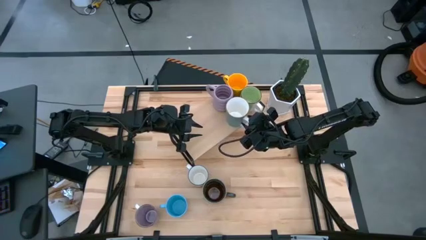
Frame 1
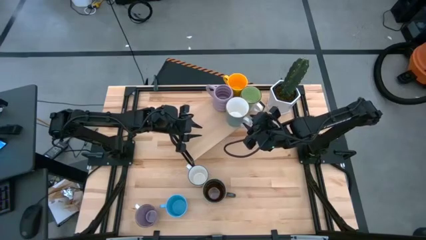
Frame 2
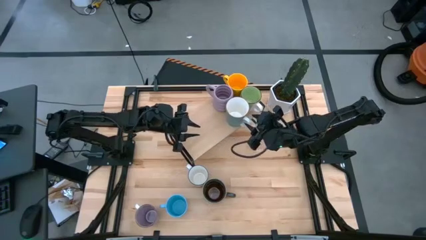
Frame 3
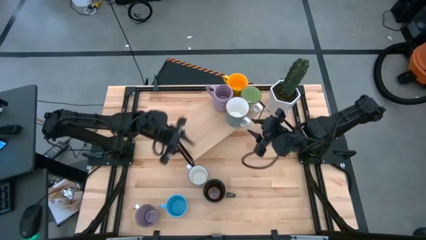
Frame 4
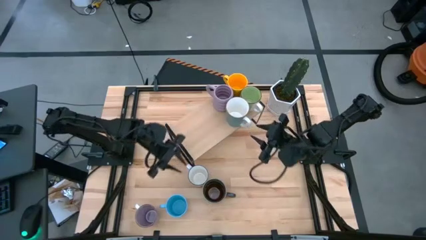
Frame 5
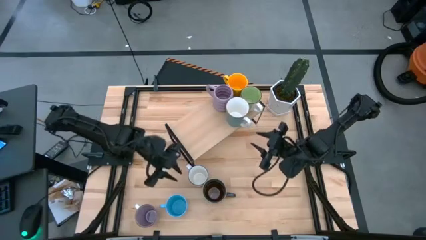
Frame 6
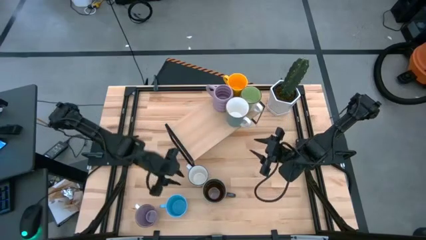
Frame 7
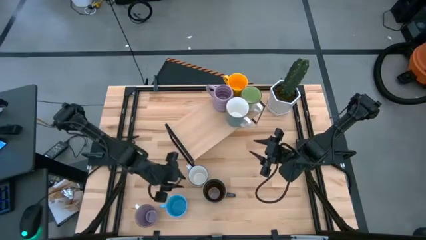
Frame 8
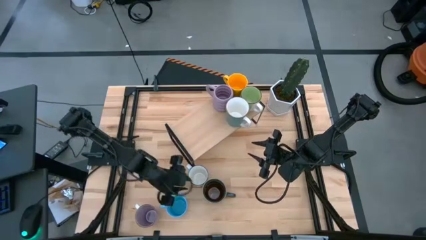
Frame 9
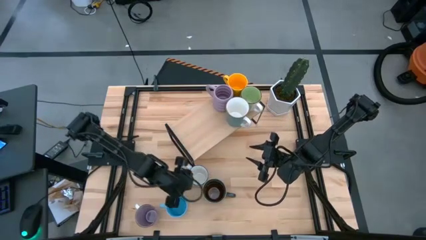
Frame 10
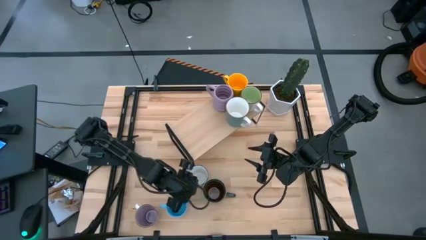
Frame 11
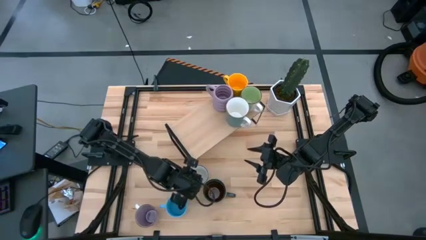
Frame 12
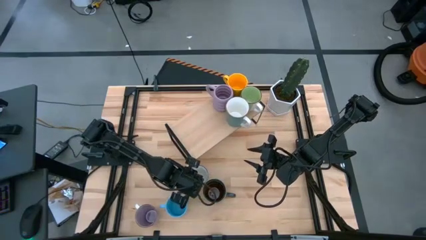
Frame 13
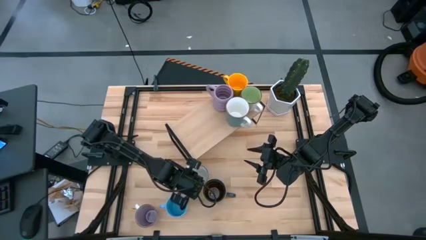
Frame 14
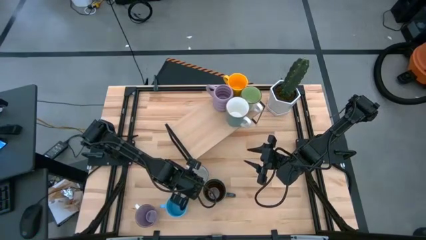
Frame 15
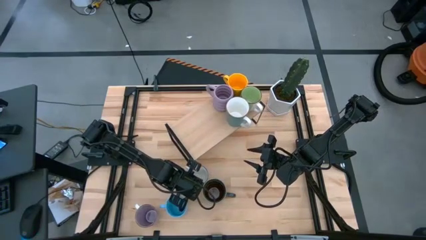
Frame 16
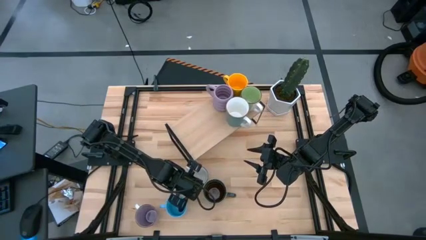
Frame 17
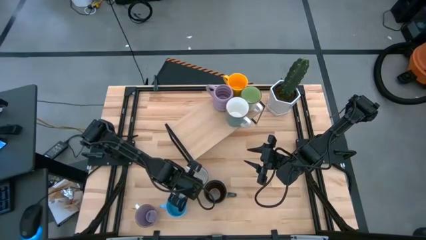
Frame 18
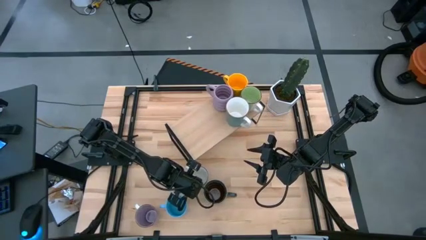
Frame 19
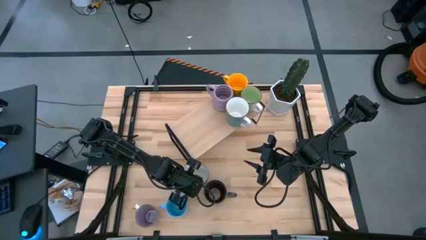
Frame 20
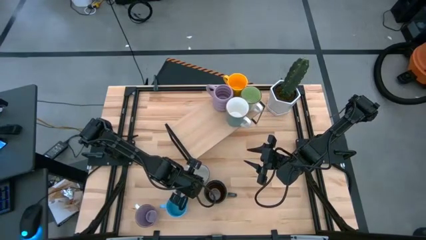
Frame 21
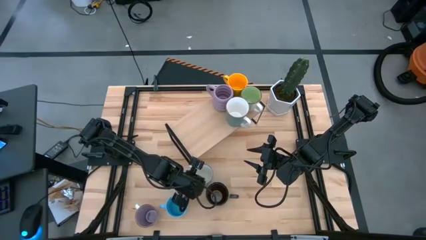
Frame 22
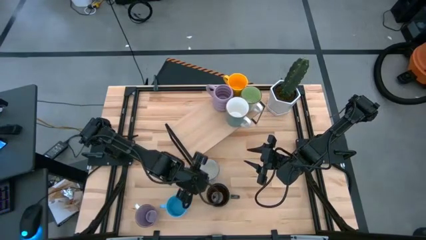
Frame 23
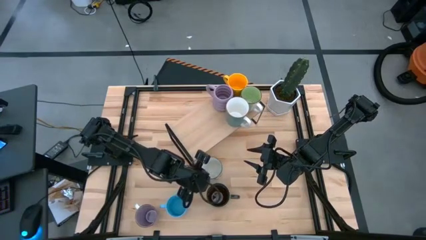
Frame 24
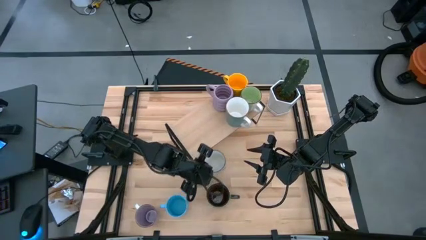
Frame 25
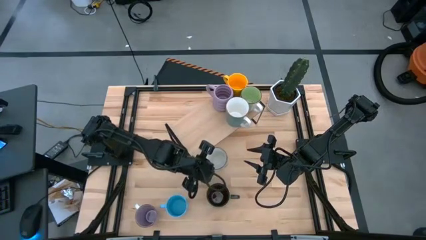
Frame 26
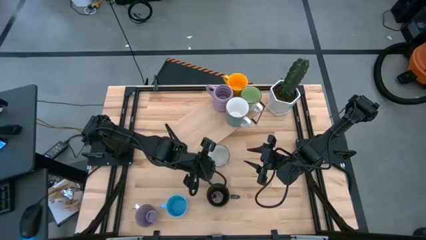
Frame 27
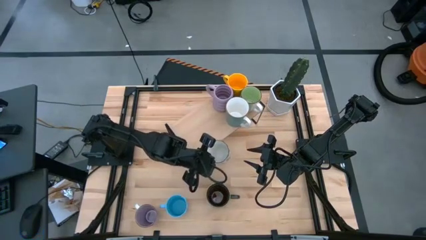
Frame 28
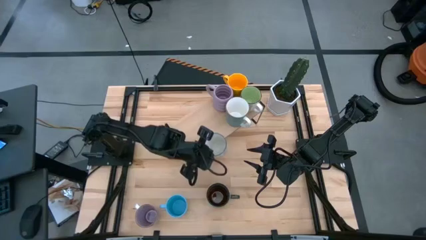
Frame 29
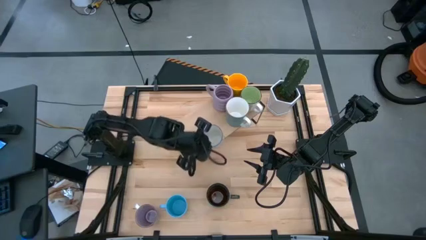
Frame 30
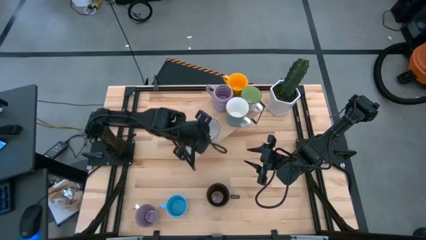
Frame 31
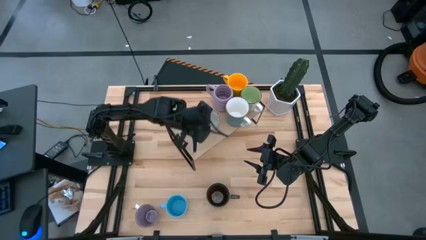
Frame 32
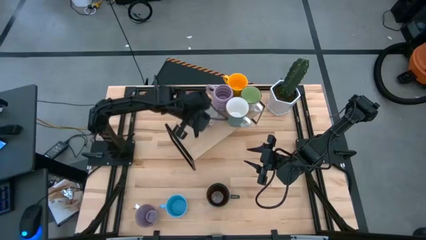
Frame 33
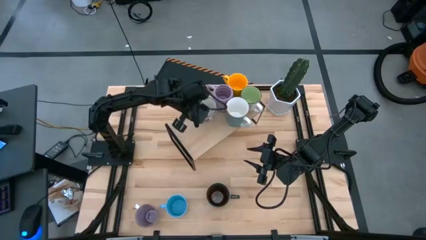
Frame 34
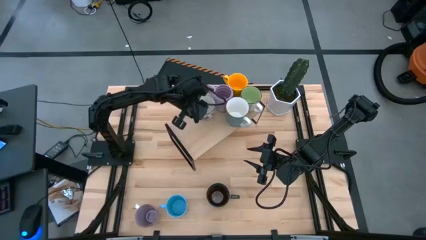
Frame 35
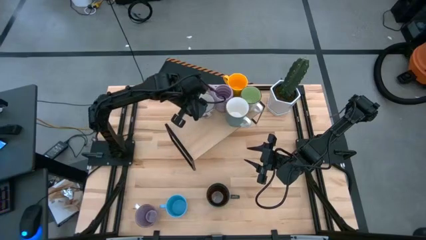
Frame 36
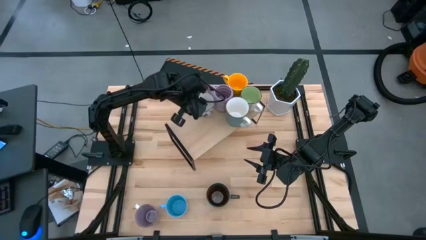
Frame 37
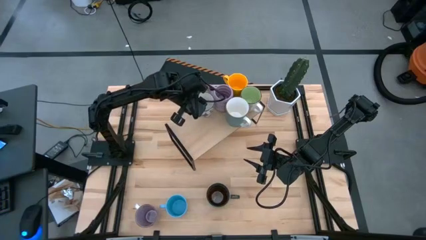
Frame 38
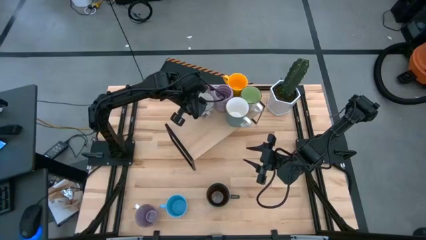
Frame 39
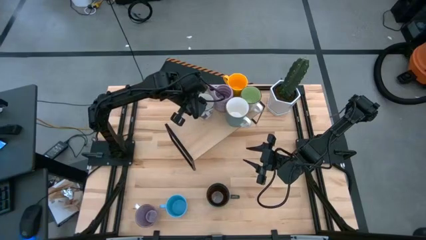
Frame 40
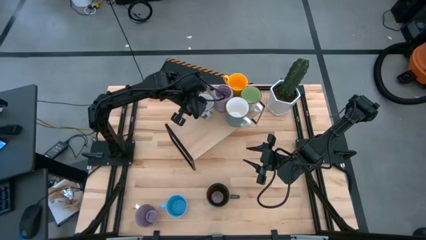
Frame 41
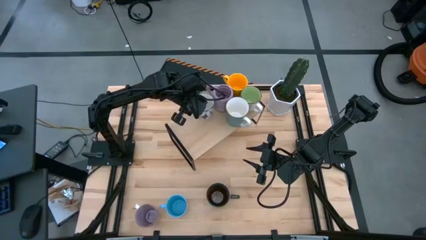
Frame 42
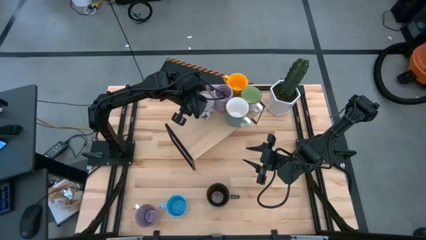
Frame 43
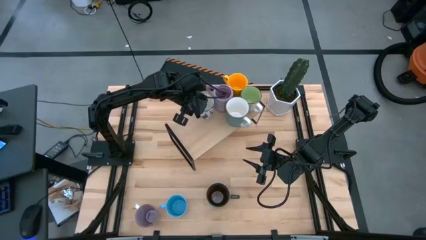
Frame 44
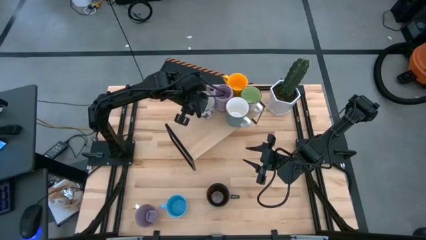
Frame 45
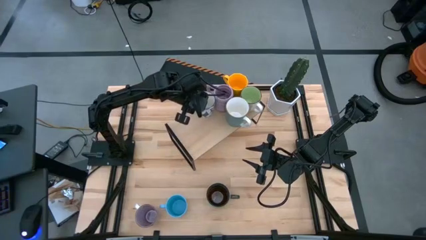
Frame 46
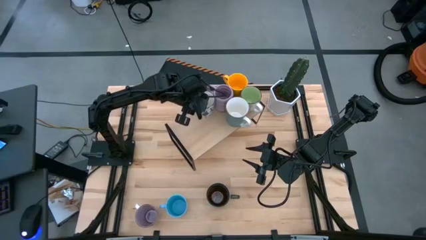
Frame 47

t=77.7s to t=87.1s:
Task: Place coffee mugs
Put the blue patterned mug on the shelf

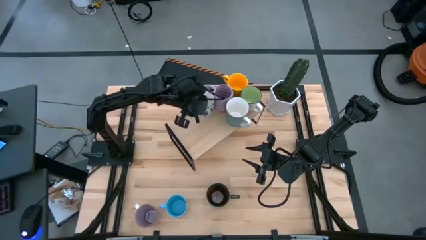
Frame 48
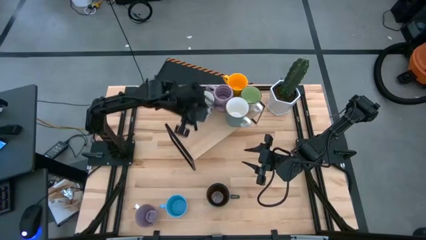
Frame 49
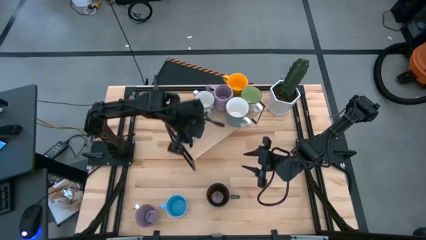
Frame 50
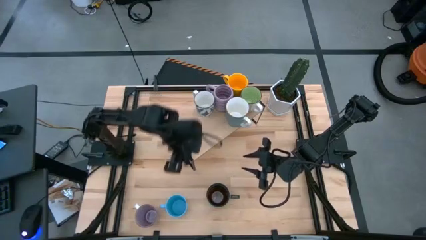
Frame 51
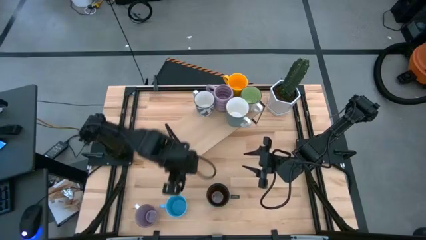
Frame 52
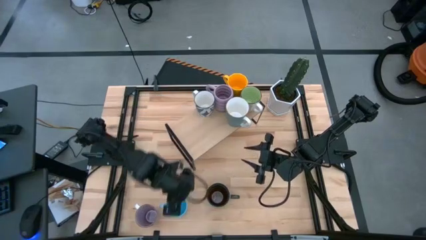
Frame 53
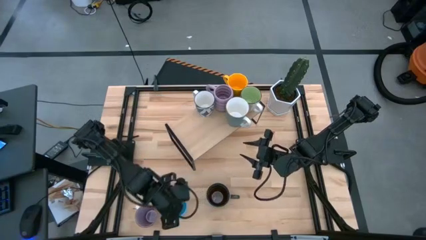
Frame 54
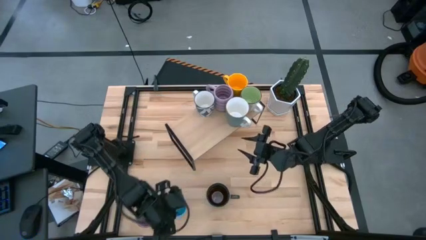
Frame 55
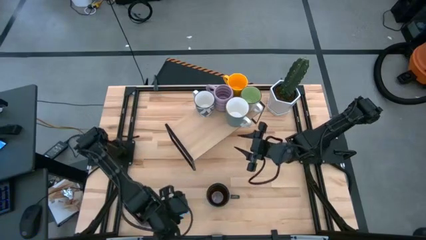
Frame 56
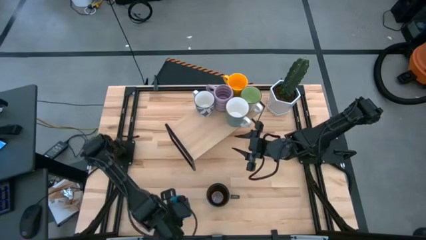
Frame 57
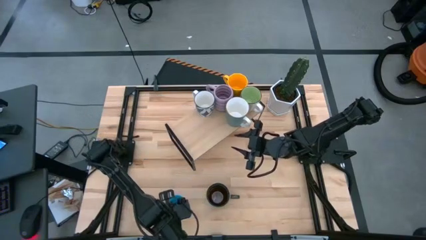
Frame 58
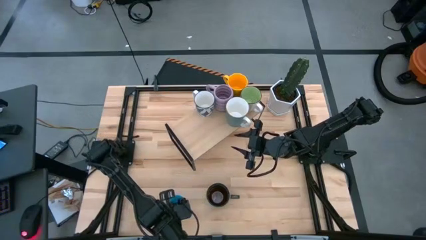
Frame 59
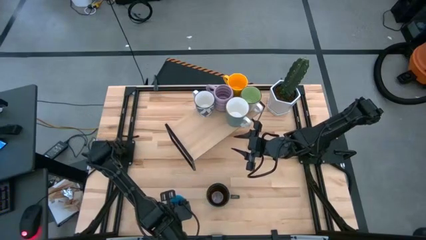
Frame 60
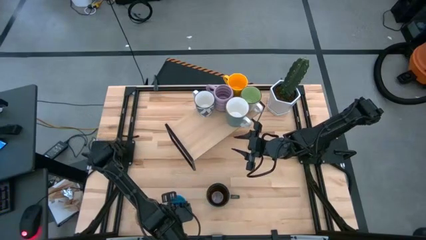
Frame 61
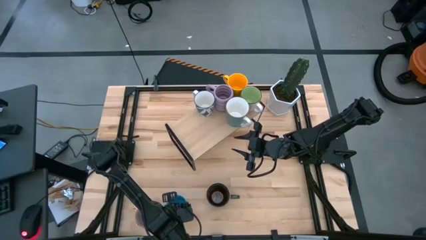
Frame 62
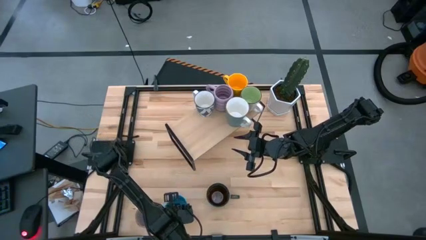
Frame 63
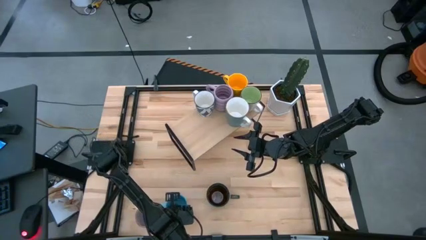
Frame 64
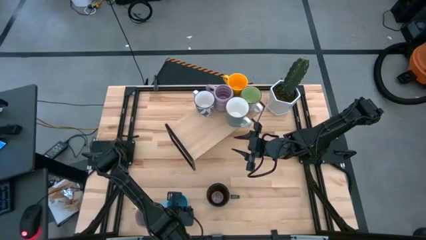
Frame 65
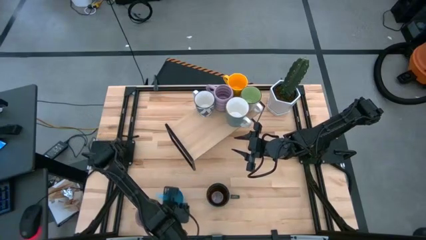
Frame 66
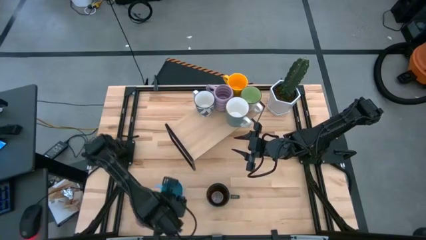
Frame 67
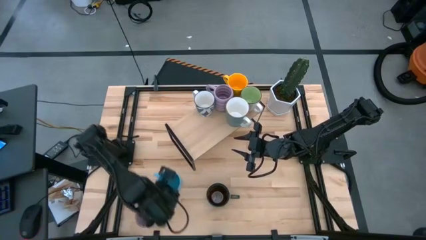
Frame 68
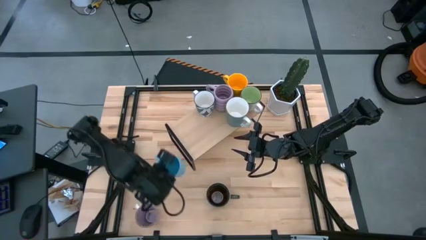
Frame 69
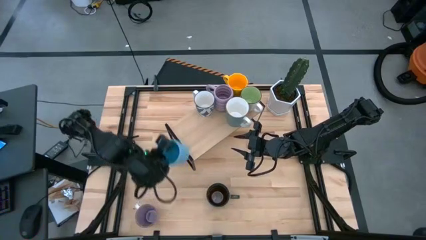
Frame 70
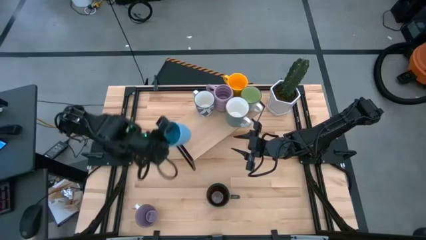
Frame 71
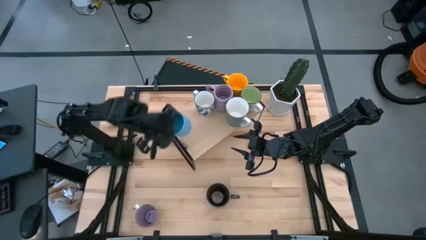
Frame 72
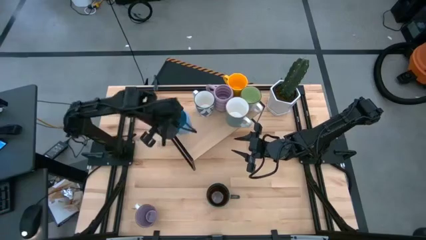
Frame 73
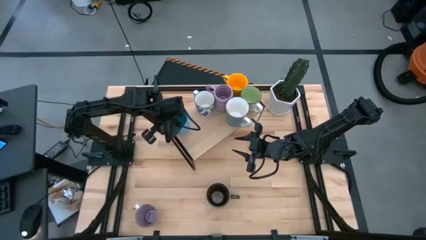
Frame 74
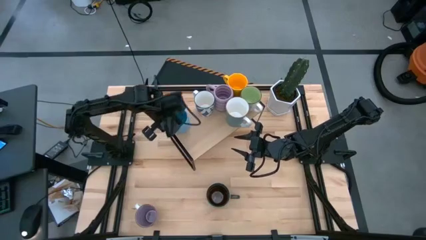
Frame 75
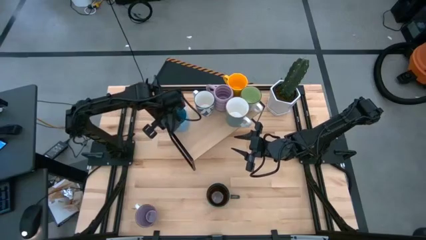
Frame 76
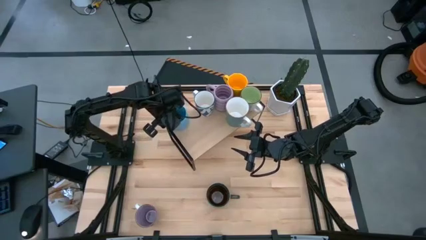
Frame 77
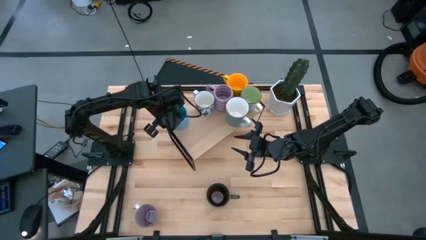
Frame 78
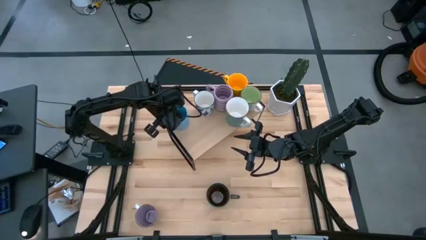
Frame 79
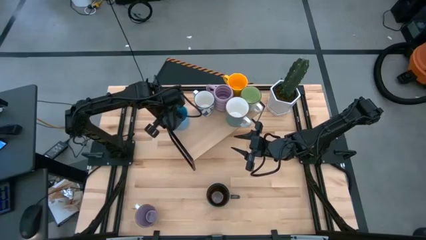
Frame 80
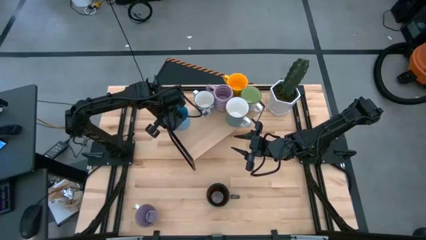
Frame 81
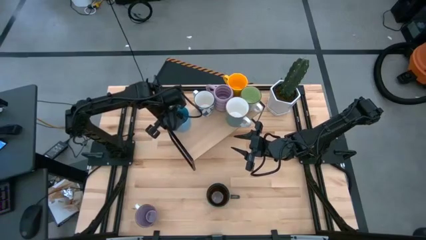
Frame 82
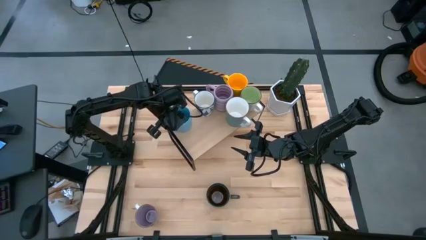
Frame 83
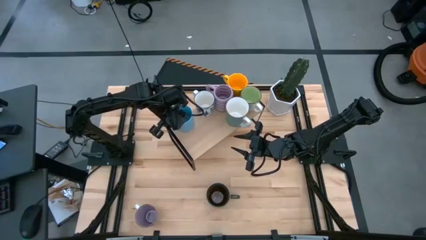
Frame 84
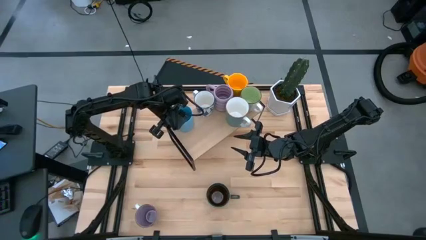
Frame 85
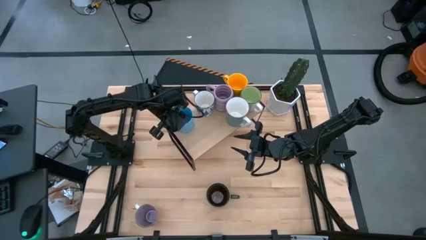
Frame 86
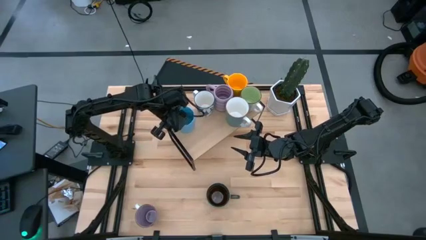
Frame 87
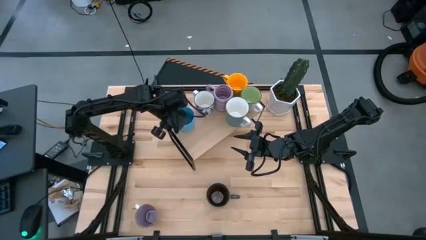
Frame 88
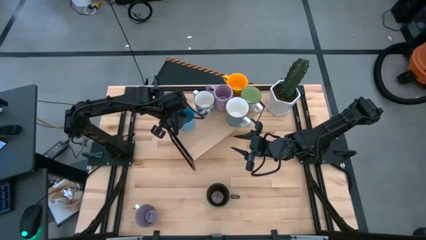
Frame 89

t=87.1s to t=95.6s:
Put the light blue mug on the shelf
